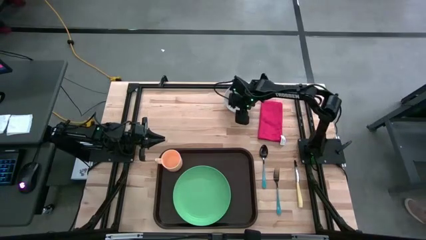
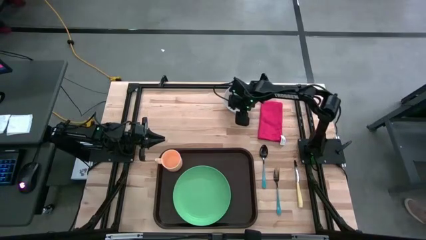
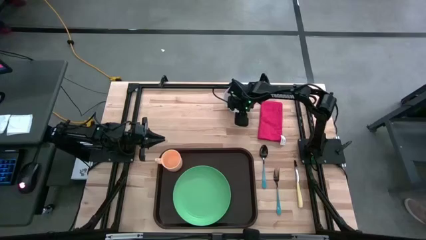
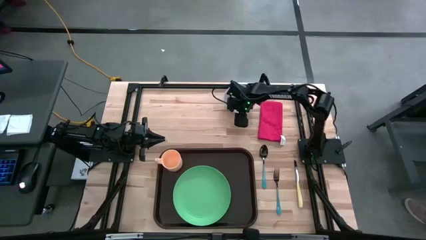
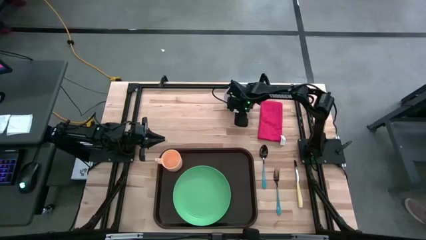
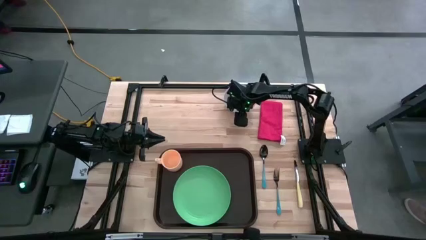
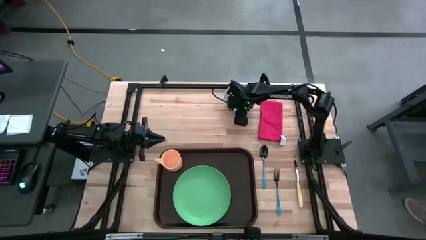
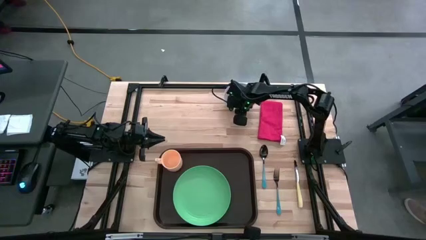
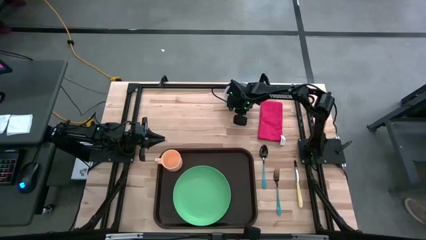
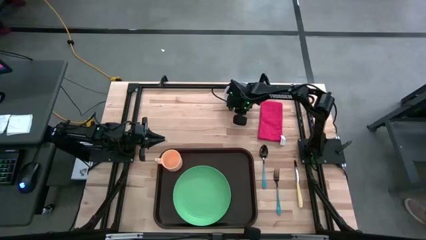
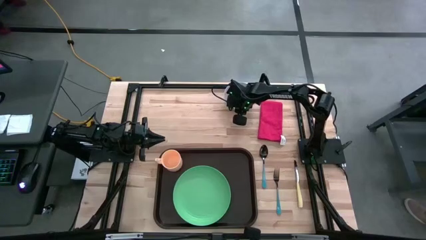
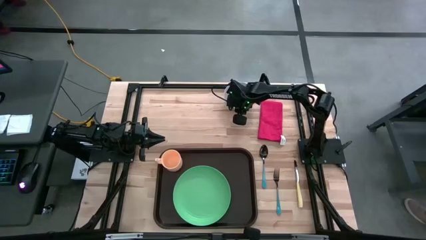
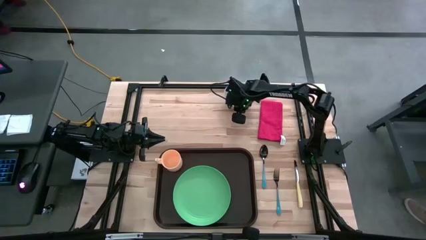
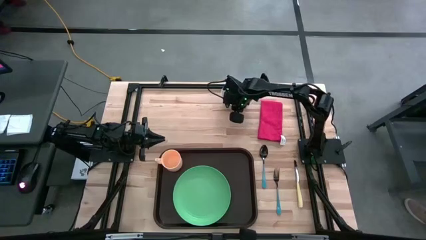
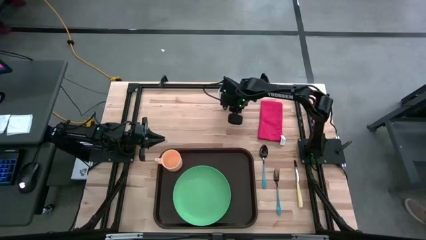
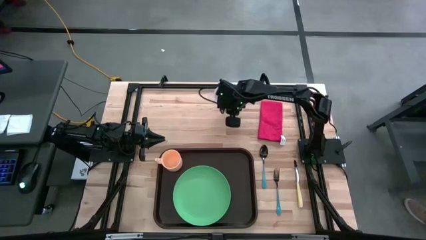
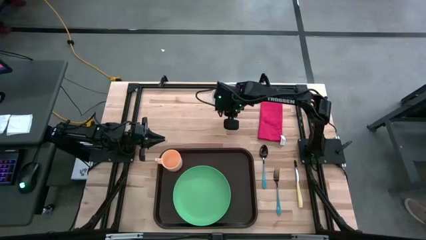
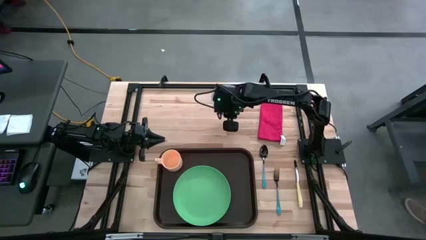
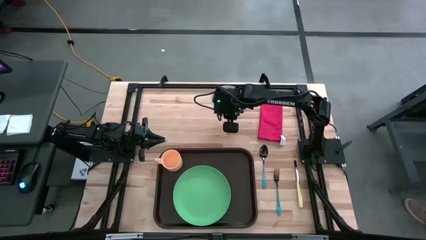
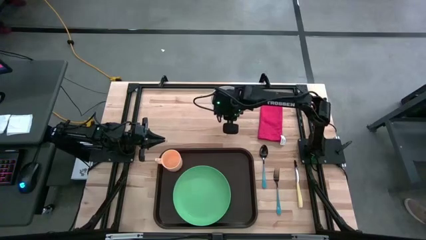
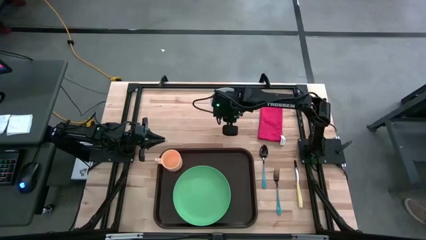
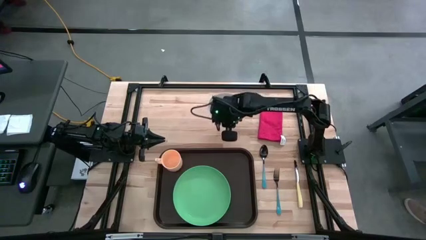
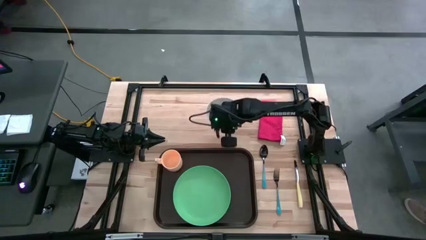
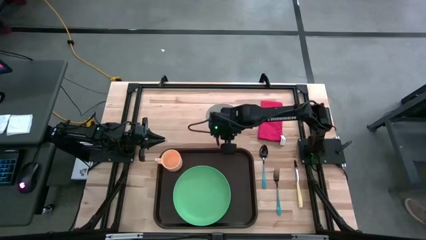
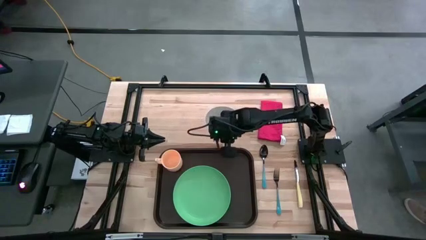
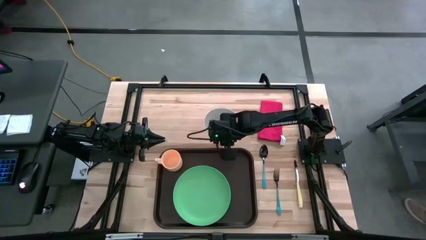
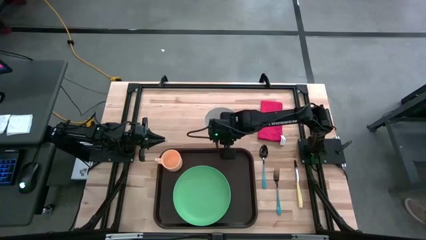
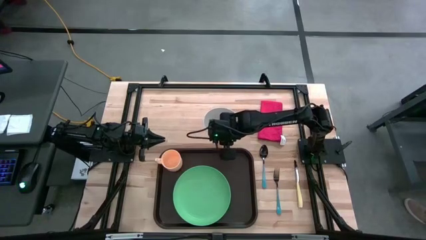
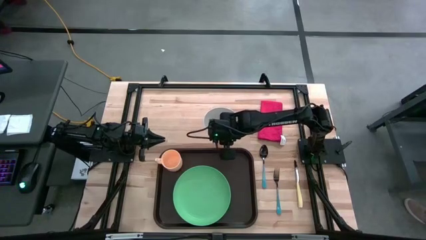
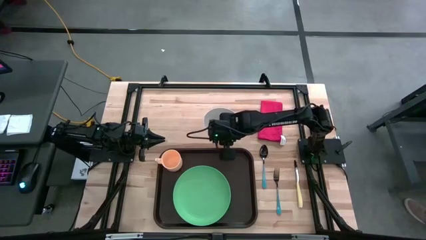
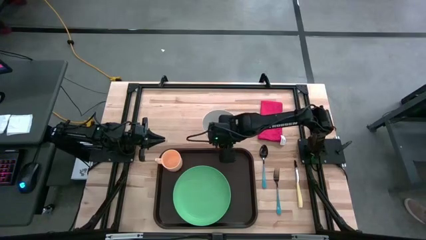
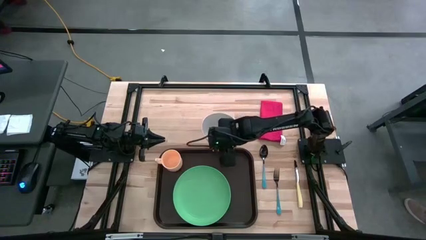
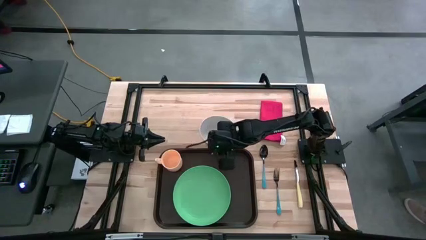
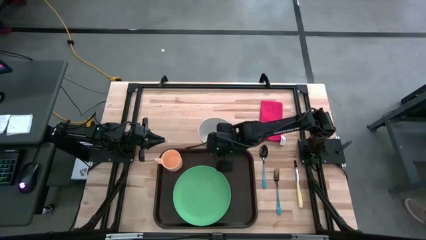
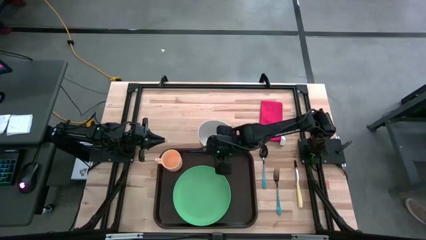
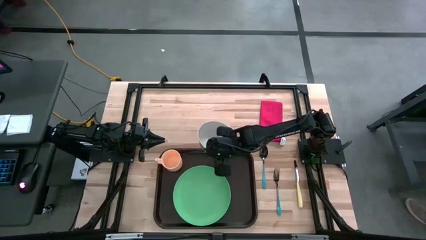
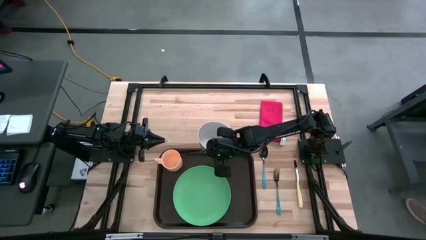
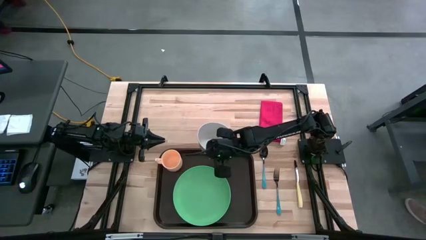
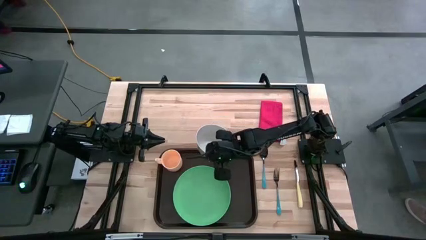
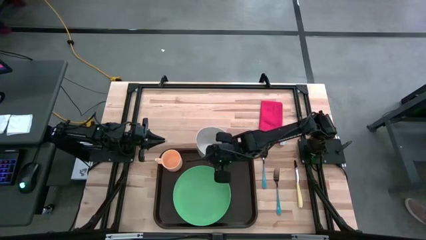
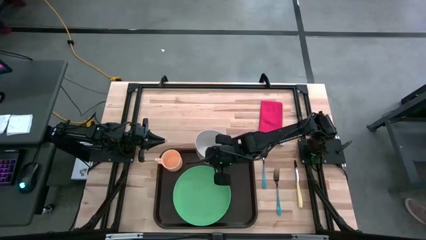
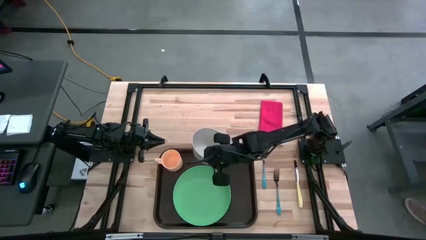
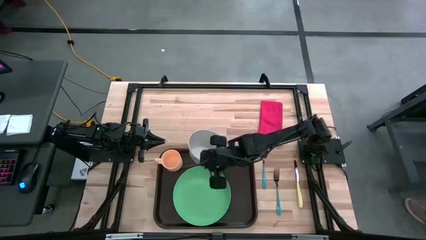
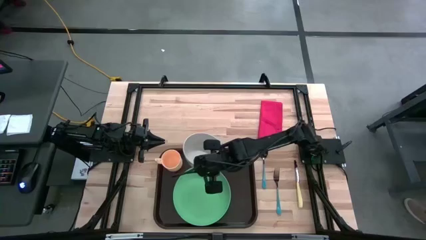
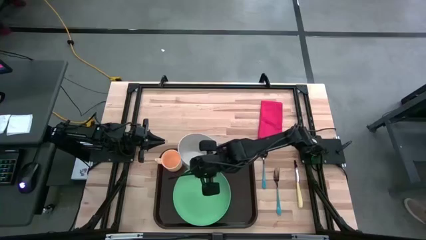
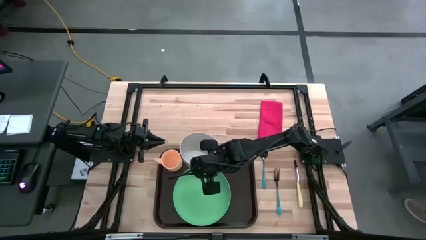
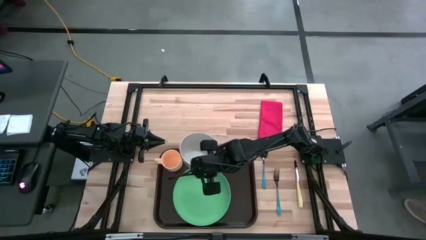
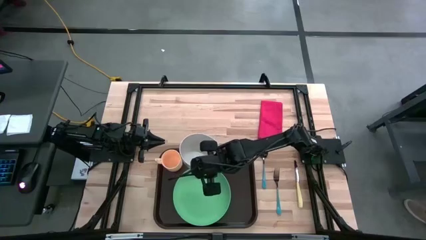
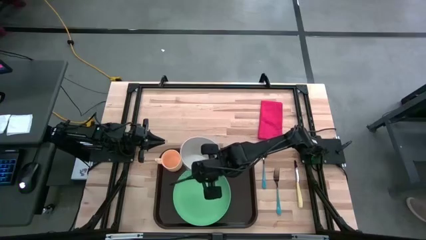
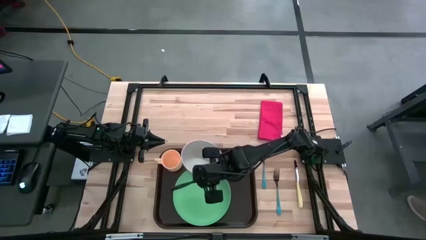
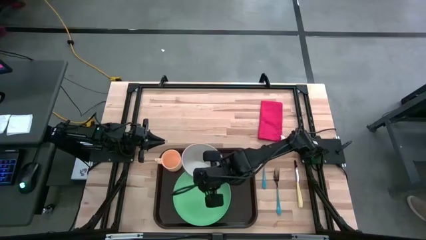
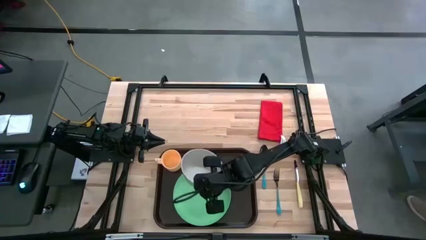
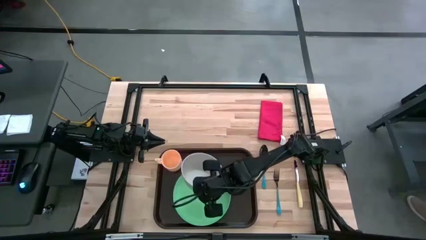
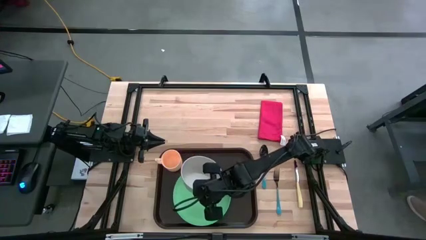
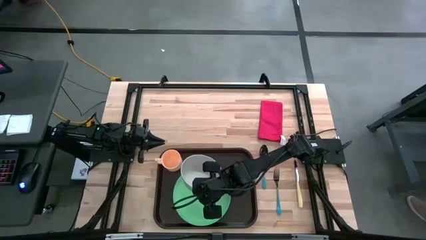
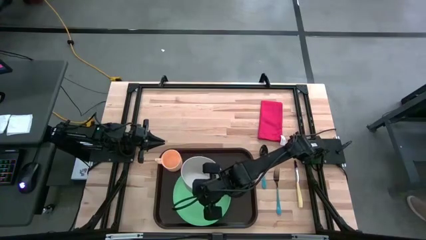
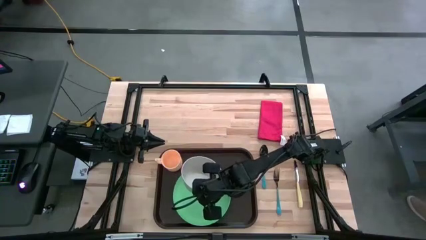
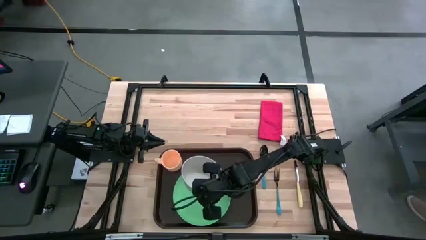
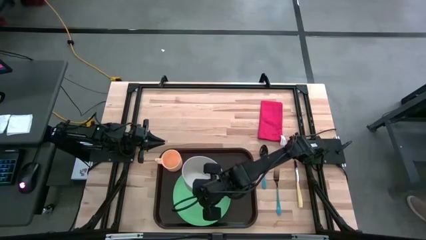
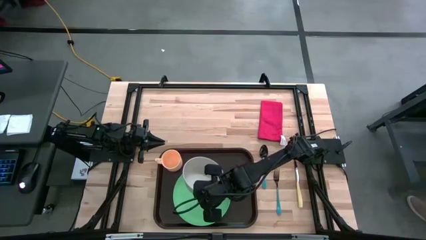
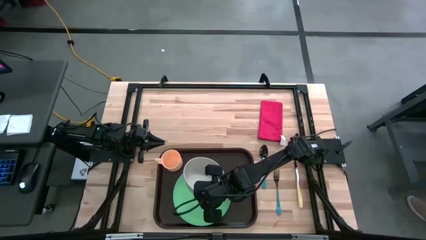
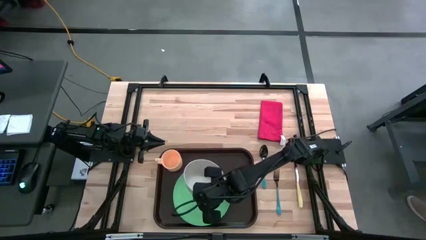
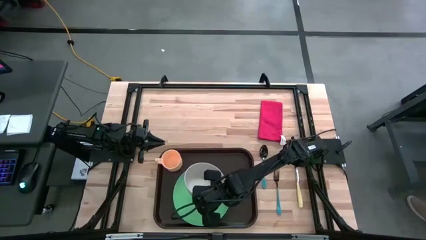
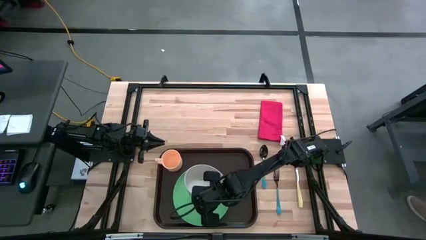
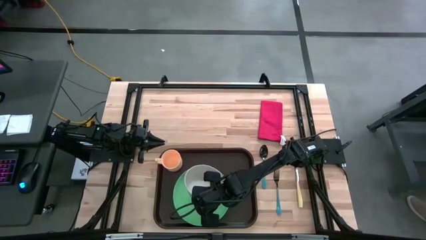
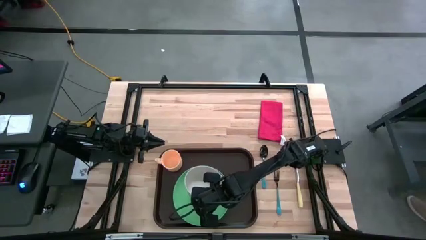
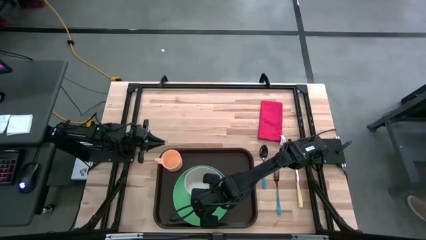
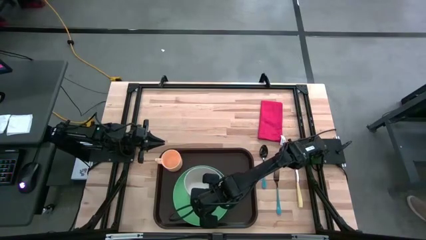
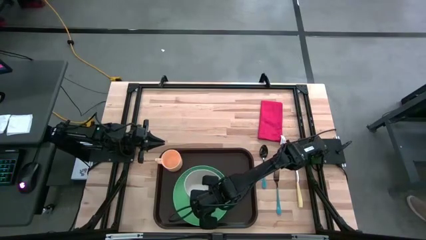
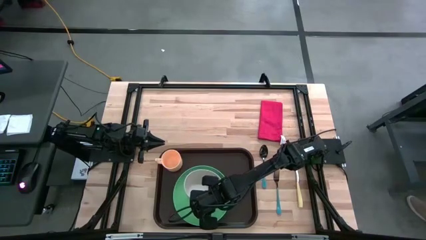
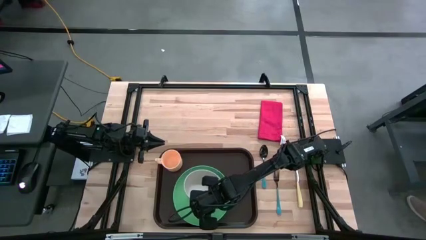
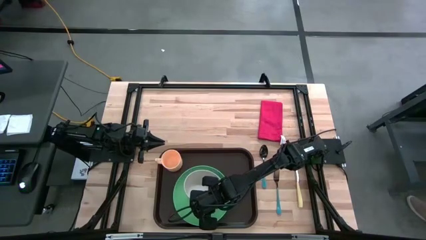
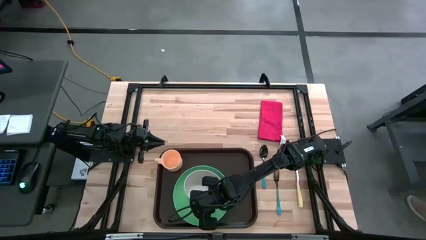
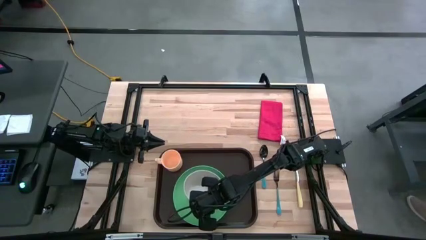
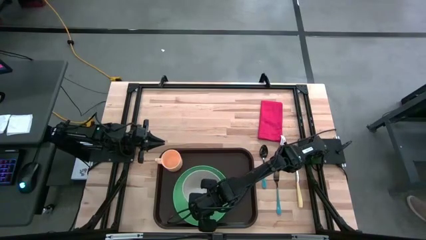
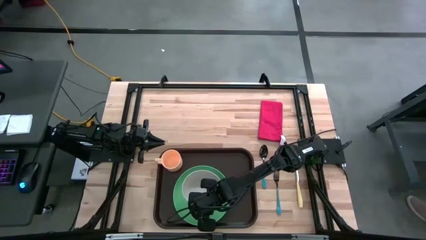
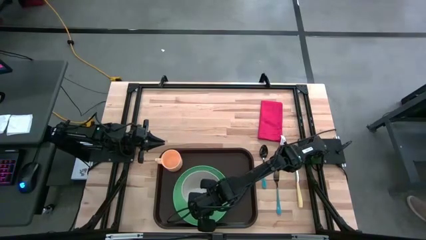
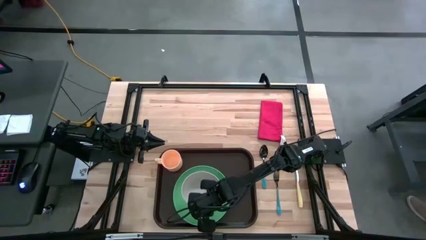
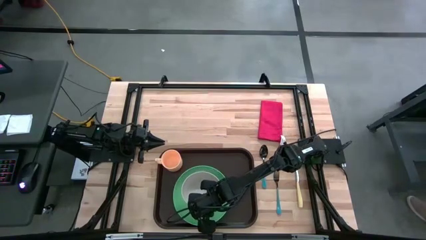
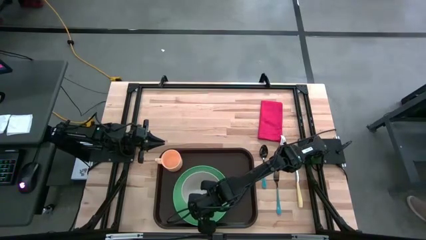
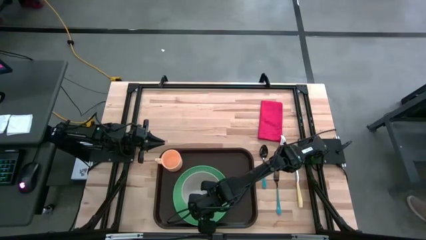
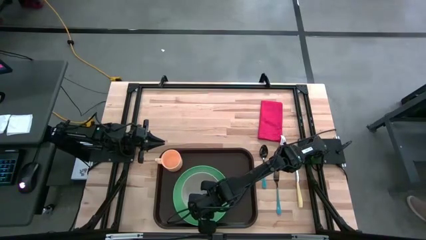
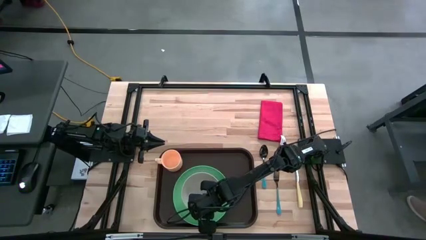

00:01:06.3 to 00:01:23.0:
Task: Set up tray
Put the gray bowl on the green plate
